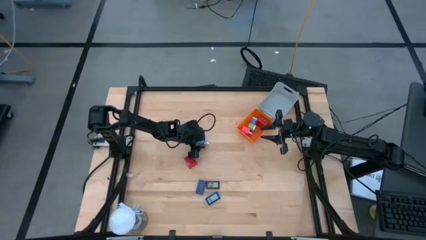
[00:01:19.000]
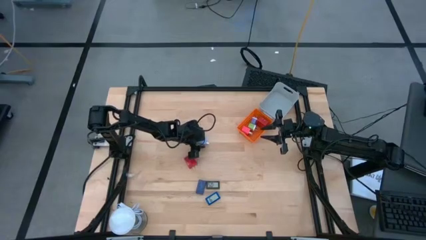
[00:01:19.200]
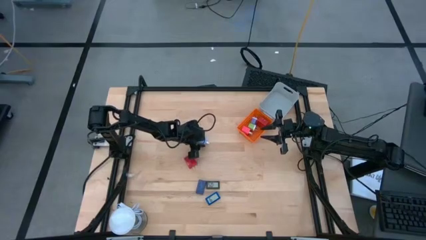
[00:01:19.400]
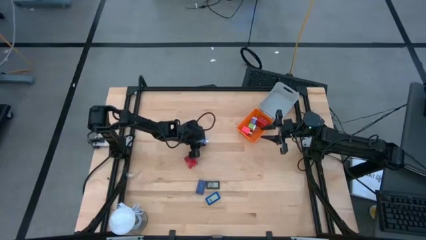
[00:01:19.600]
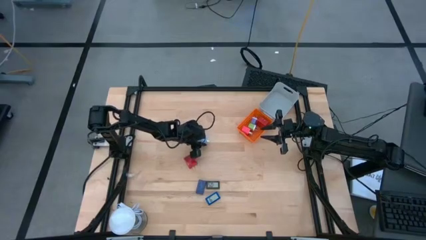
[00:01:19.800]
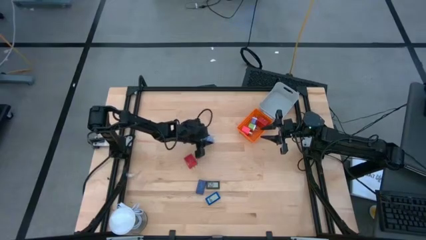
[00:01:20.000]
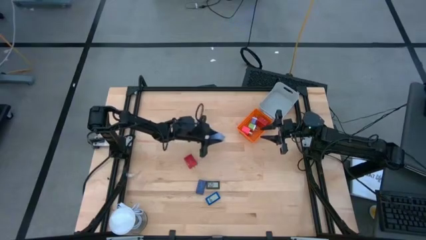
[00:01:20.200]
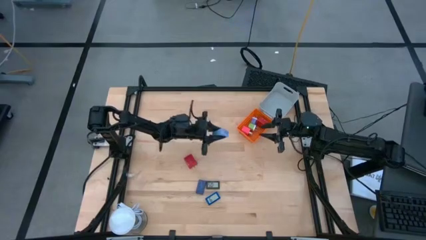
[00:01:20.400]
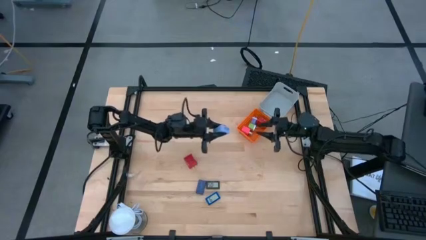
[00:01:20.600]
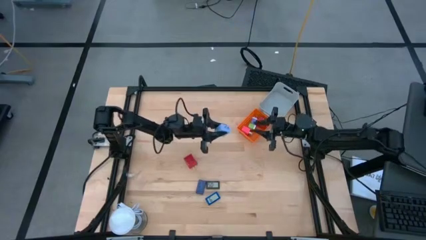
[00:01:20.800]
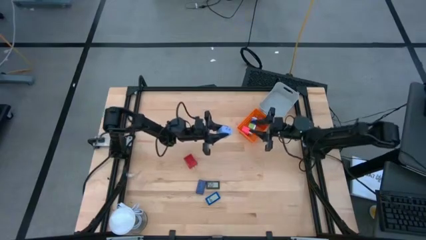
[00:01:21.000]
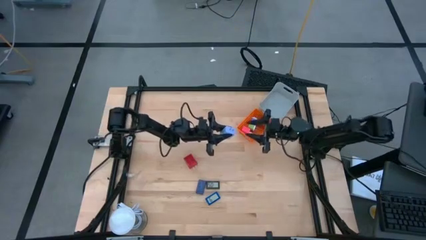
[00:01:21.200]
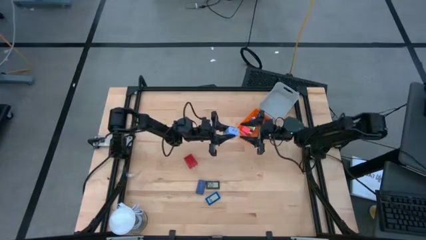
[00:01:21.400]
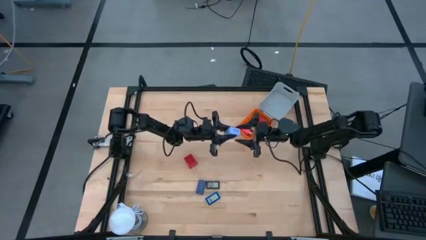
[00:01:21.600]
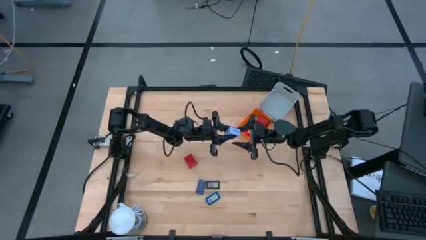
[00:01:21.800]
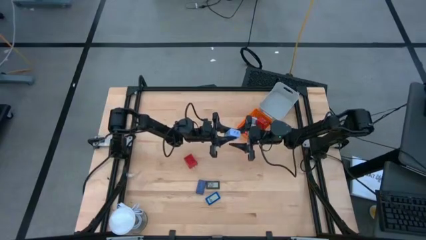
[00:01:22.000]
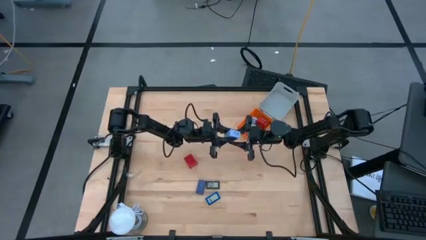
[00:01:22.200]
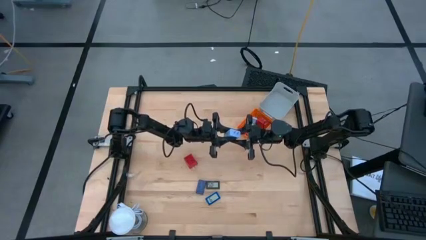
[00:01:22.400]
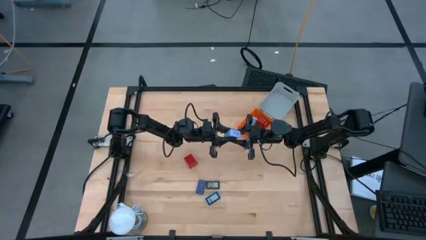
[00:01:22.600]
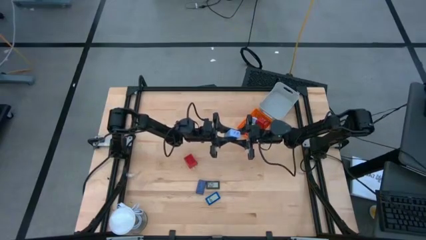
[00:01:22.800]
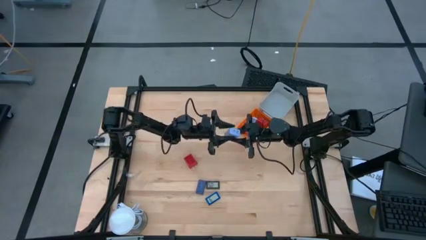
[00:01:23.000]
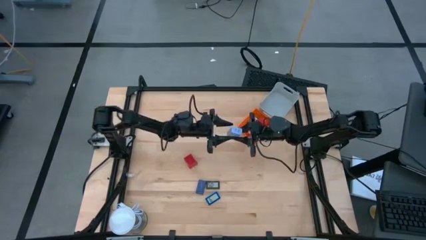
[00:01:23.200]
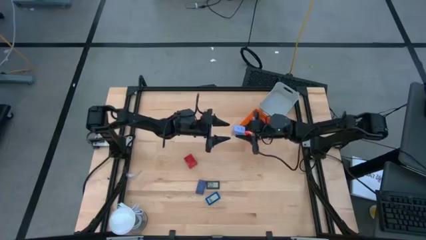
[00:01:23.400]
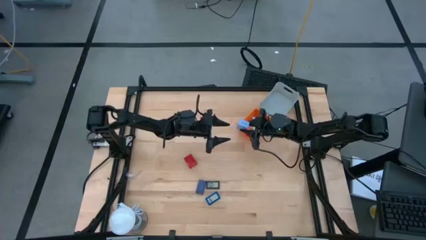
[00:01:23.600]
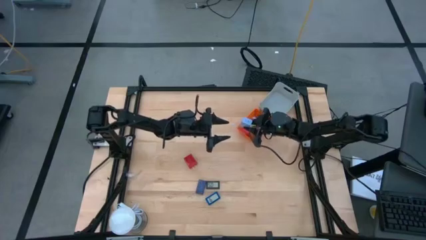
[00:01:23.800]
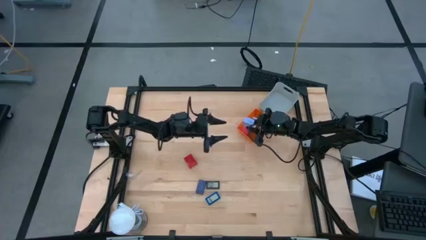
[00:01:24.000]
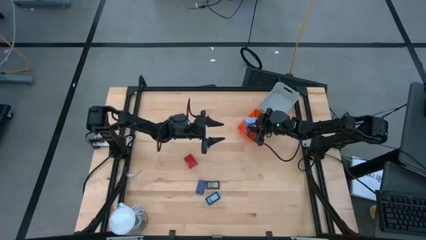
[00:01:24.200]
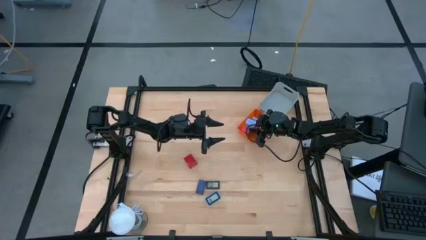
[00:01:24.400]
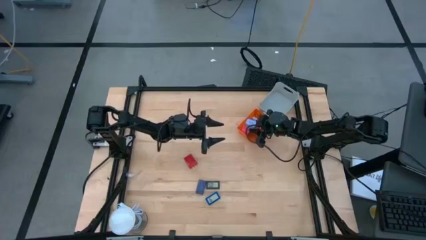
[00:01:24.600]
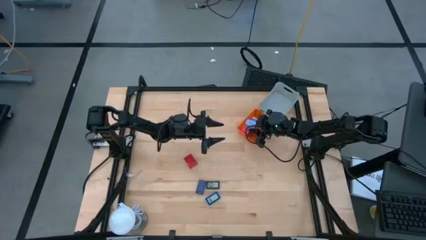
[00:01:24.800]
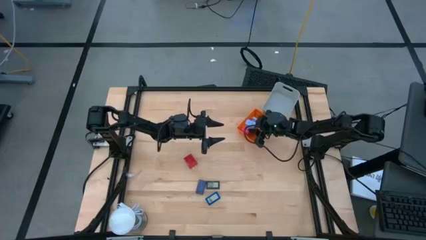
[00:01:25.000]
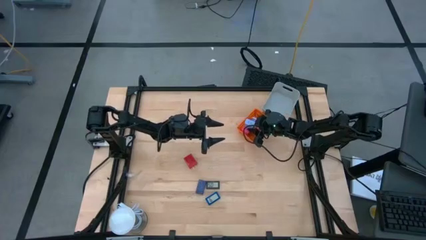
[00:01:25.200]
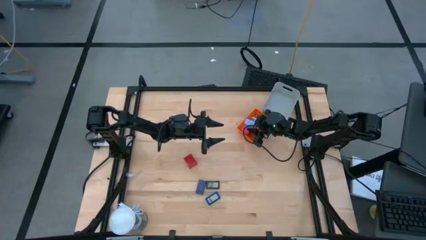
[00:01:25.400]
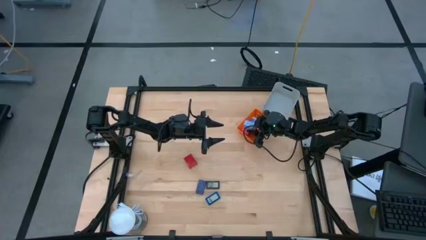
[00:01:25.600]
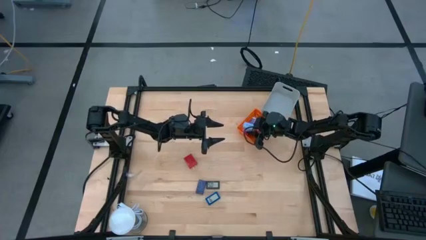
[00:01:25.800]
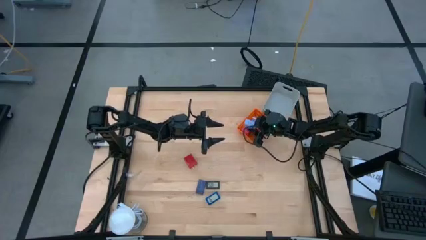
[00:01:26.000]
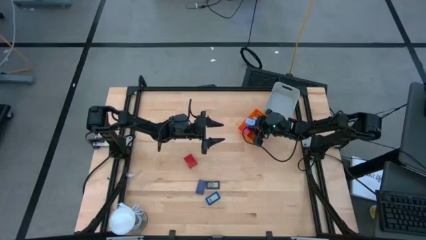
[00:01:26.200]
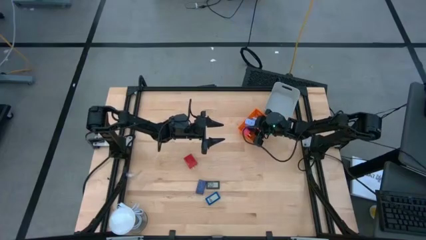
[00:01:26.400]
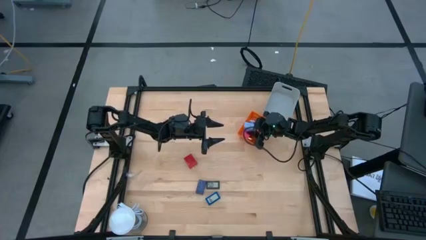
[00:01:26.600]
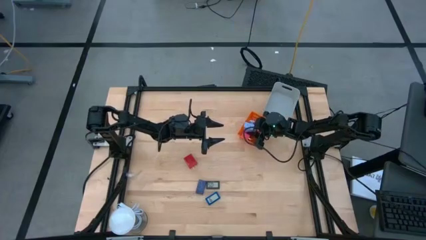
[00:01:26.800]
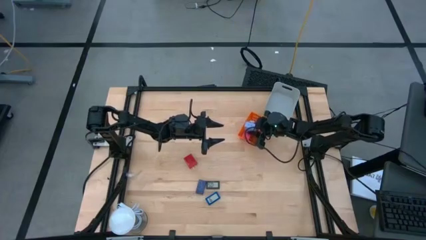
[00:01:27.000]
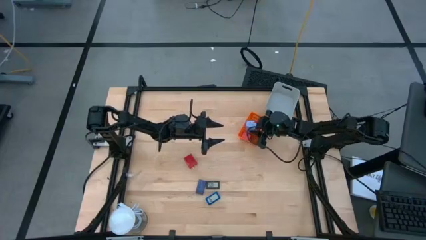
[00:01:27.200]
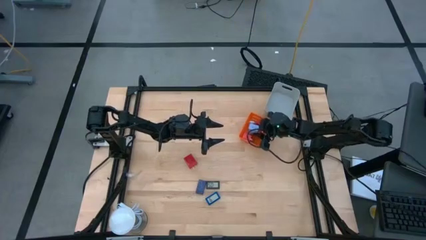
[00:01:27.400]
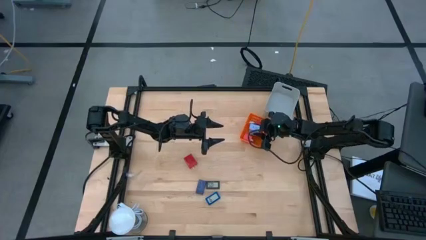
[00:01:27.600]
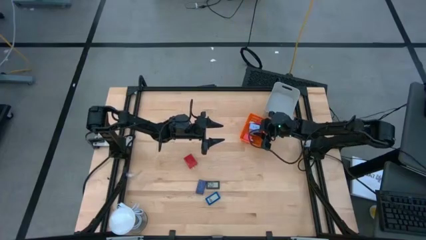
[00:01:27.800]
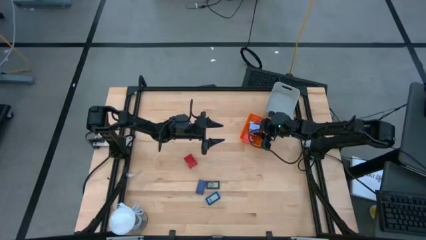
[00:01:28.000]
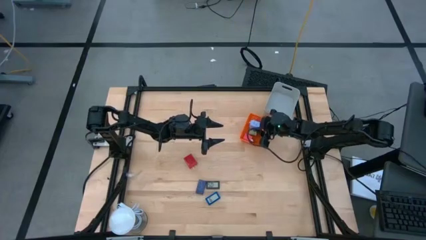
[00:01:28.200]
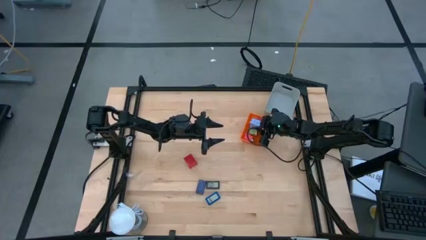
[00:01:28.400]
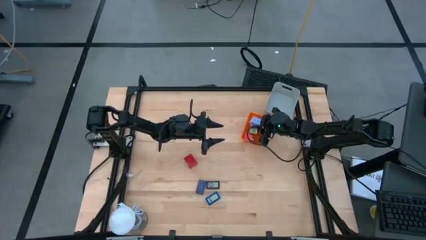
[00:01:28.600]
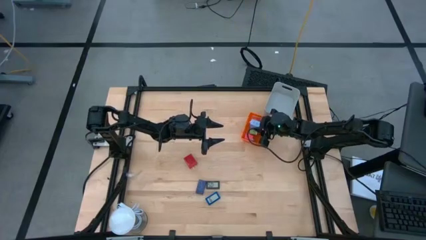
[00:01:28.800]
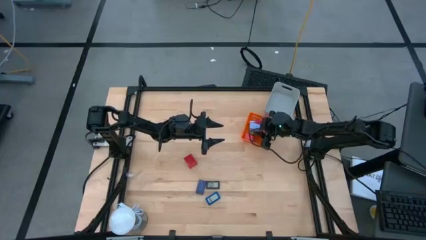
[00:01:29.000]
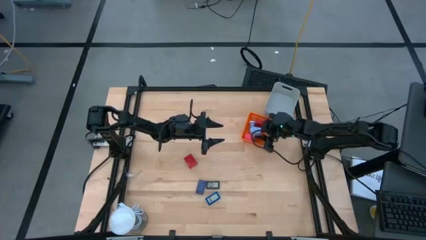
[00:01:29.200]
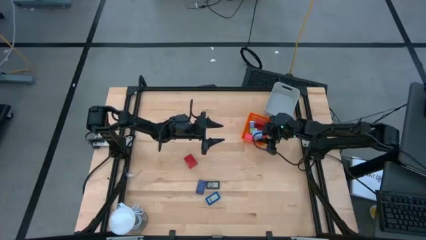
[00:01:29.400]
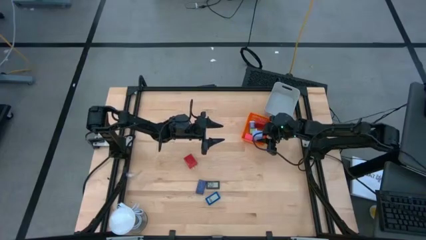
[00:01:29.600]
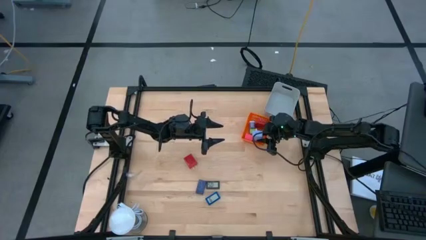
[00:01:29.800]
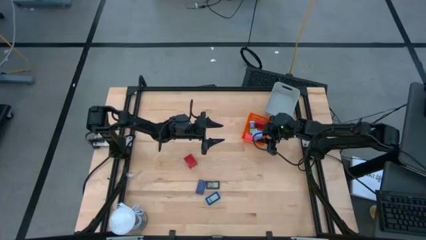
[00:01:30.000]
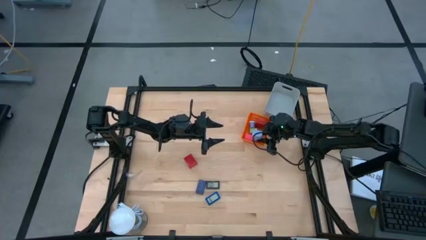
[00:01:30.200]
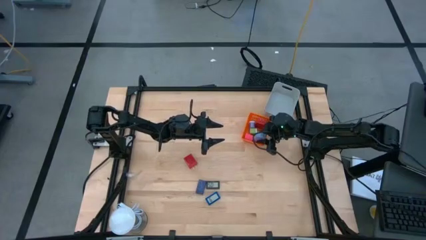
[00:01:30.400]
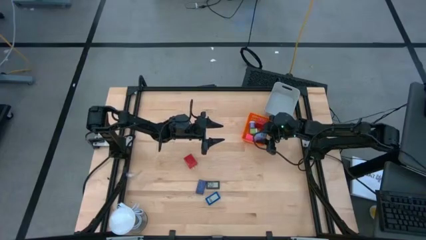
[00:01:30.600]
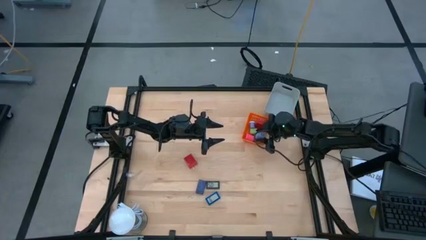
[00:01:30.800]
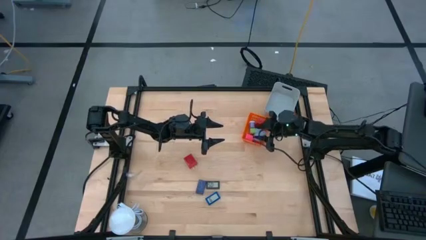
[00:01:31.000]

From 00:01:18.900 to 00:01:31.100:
Task: Pick & Place Office items
Put the blue charger adapter into the orange bin

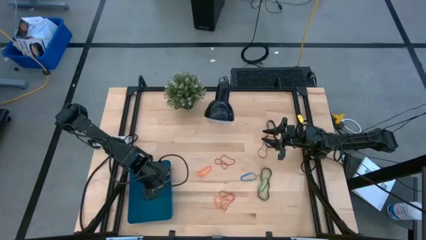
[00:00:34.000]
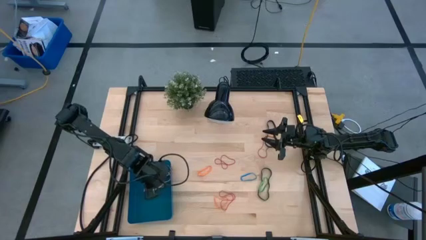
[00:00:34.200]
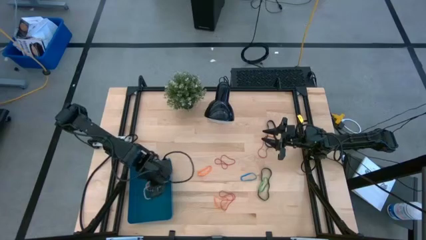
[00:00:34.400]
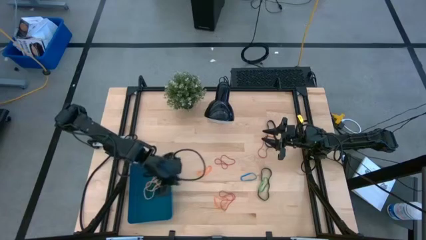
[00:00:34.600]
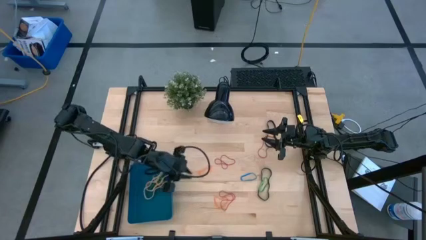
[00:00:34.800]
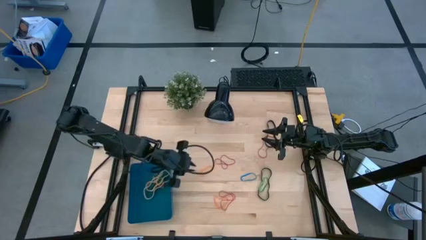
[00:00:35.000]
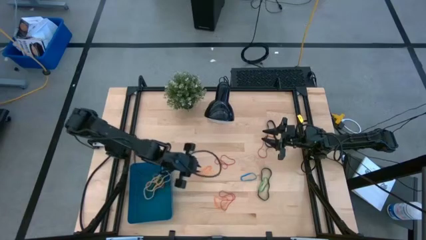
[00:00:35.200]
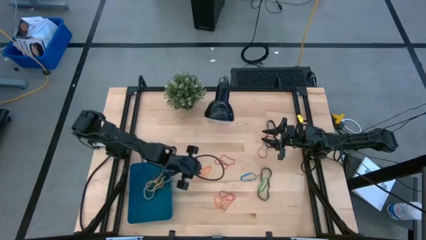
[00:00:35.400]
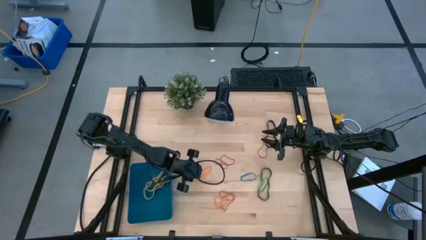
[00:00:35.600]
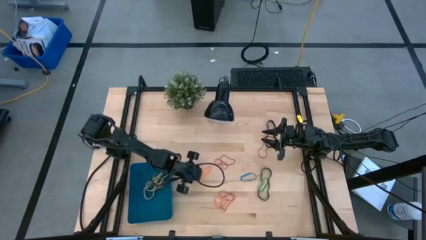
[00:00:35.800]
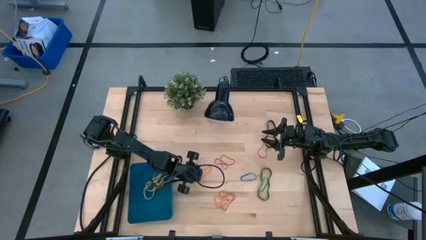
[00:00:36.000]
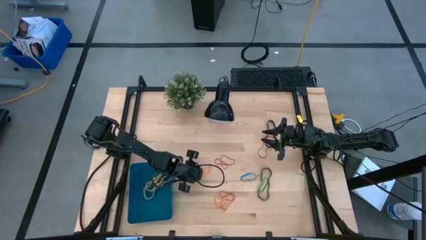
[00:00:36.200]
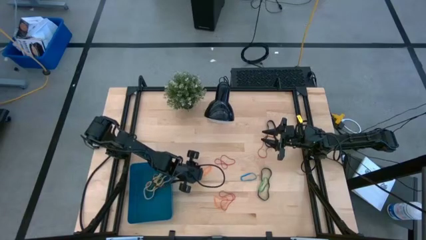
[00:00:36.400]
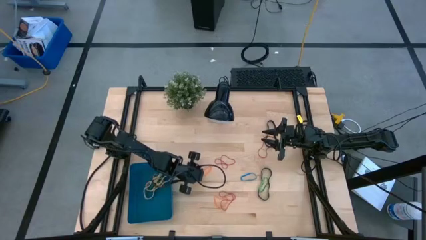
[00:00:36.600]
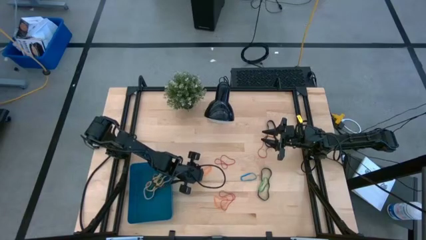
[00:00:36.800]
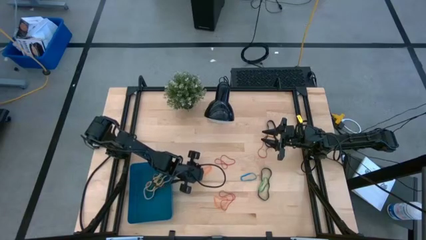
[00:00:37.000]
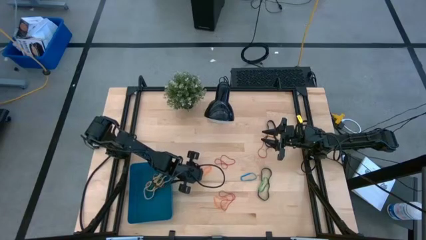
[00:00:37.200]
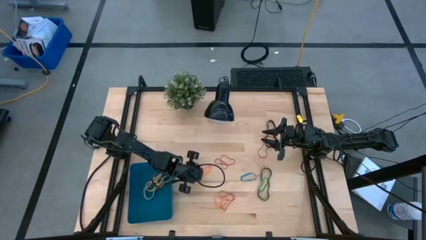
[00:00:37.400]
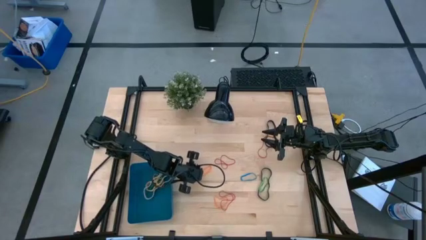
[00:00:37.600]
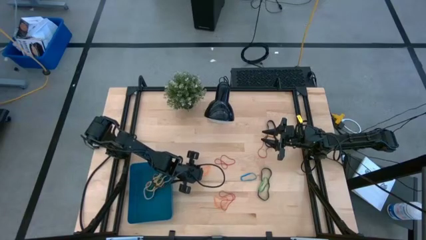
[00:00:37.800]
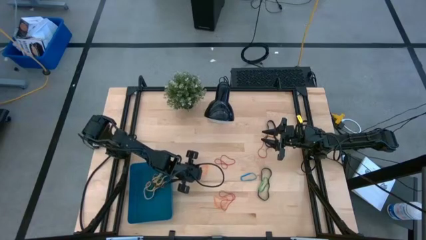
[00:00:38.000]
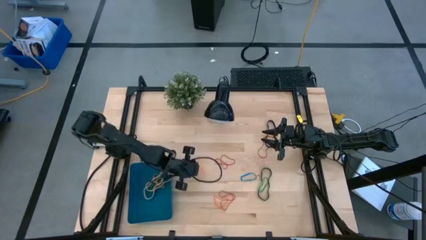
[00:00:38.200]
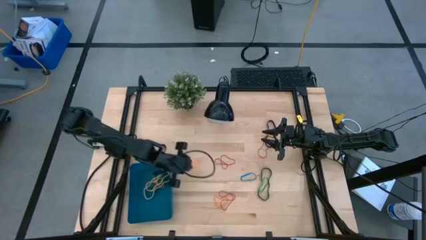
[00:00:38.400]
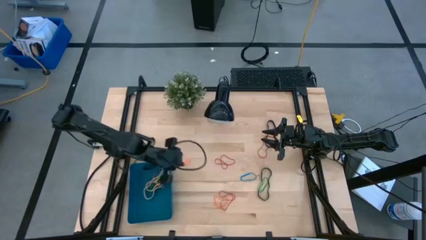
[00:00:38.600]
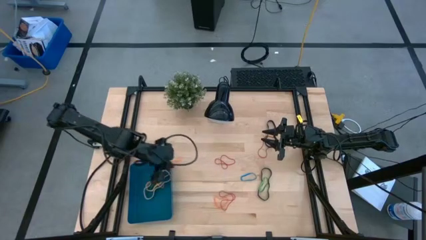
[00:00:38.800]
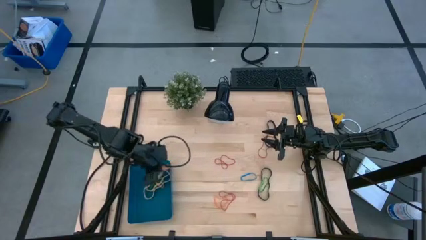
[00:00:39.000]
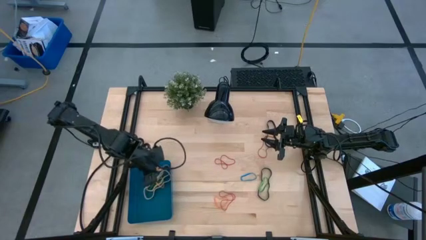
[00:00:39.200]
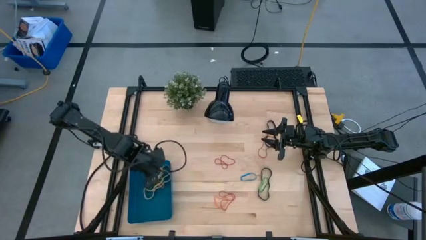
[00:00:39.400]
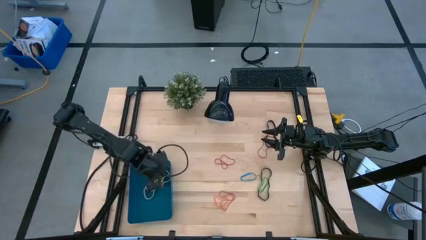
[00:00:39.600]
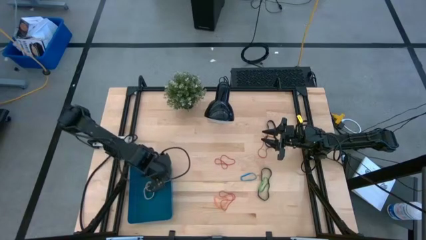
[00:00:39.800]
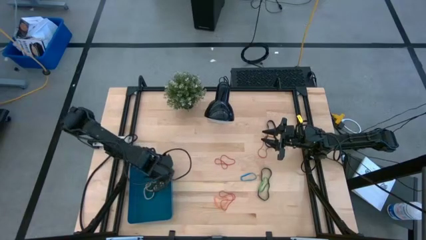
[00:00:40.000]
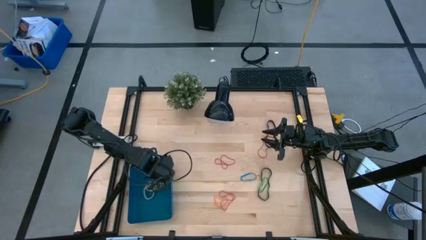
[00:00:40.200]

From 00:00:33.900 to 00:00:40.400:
Task: Pick and place rubber bands into bin
Put the top orange rubber band into the blue bin
